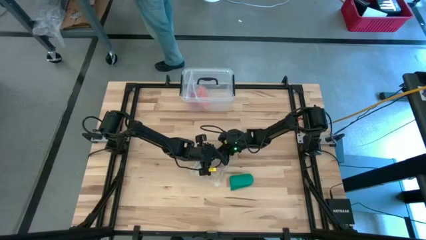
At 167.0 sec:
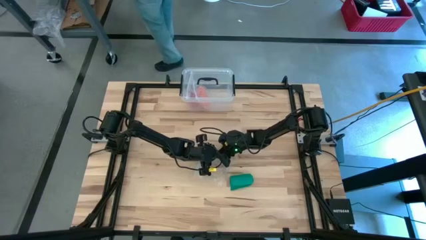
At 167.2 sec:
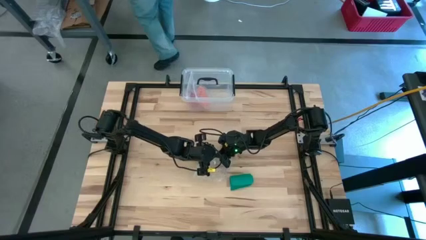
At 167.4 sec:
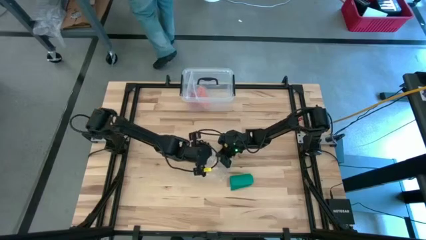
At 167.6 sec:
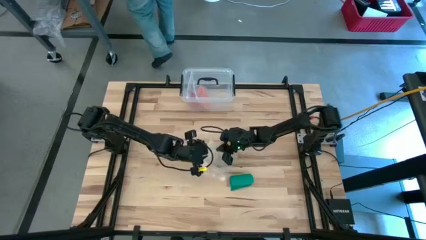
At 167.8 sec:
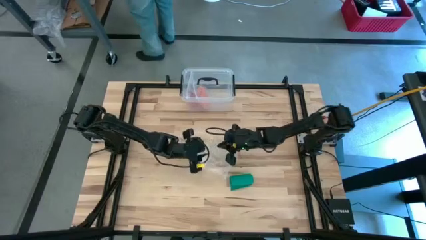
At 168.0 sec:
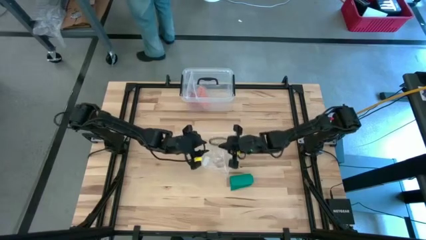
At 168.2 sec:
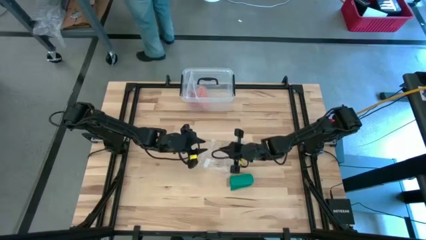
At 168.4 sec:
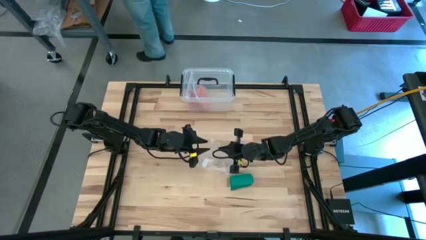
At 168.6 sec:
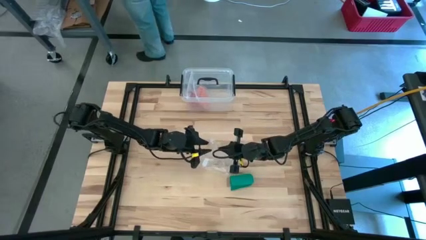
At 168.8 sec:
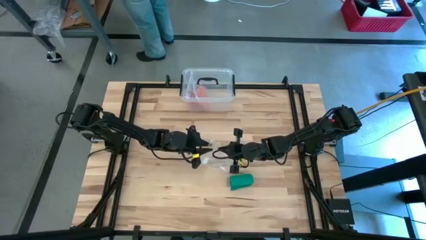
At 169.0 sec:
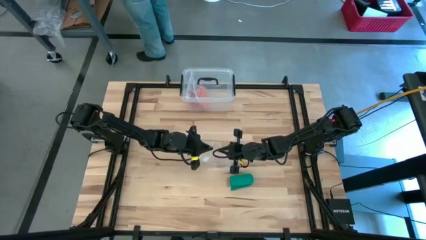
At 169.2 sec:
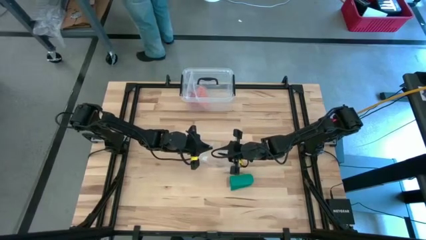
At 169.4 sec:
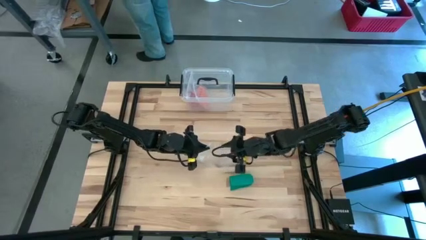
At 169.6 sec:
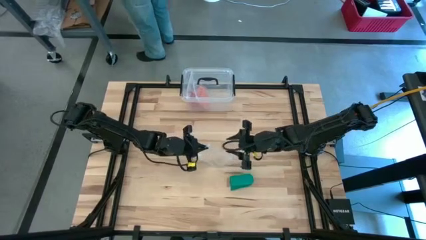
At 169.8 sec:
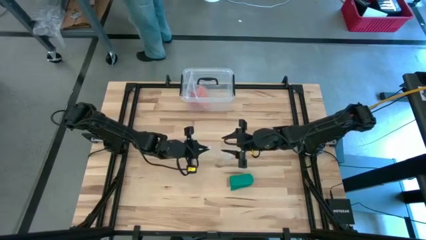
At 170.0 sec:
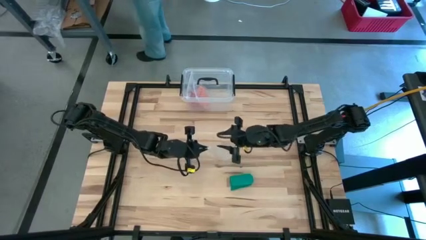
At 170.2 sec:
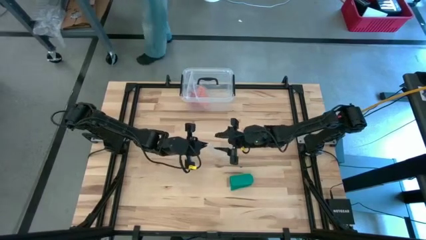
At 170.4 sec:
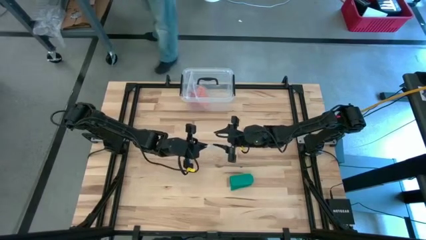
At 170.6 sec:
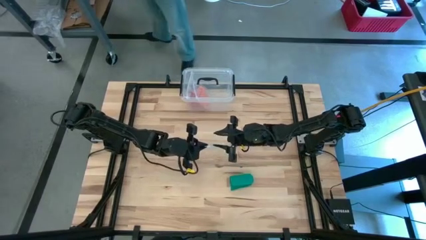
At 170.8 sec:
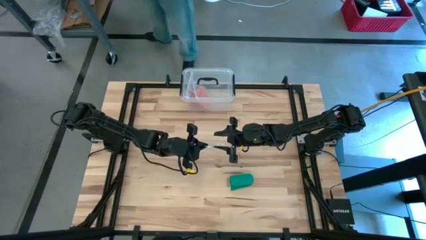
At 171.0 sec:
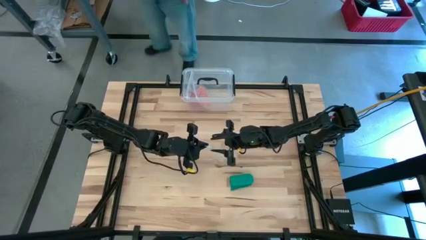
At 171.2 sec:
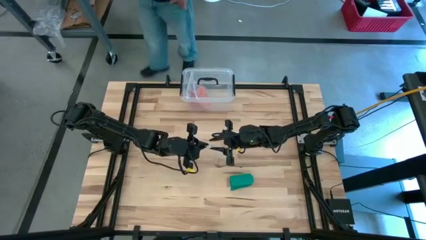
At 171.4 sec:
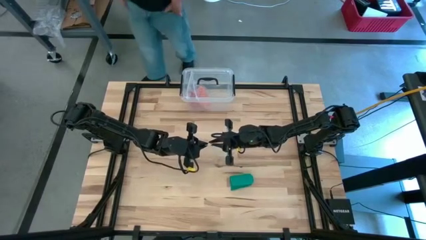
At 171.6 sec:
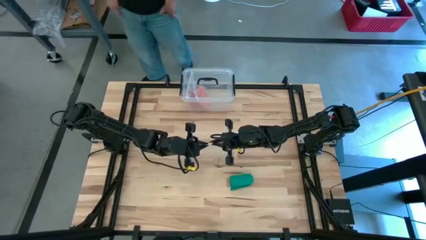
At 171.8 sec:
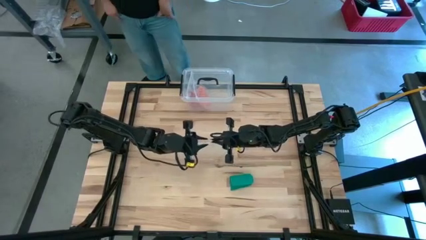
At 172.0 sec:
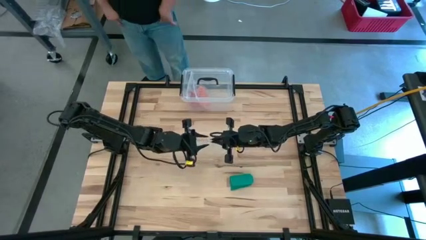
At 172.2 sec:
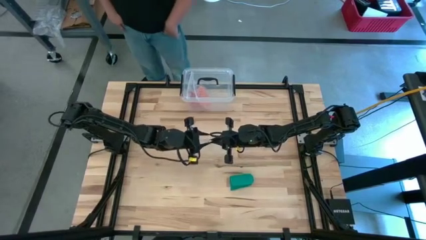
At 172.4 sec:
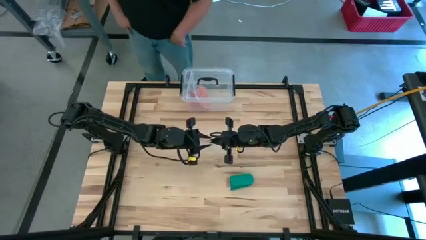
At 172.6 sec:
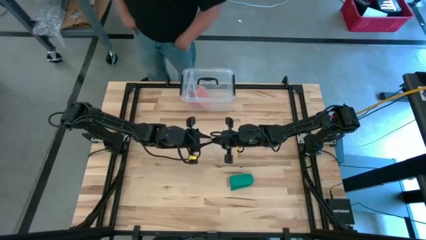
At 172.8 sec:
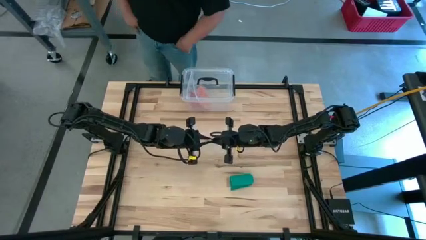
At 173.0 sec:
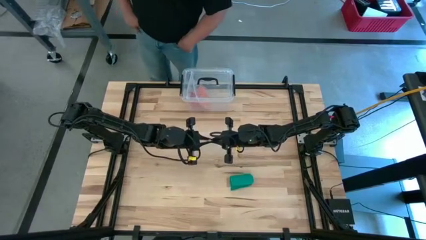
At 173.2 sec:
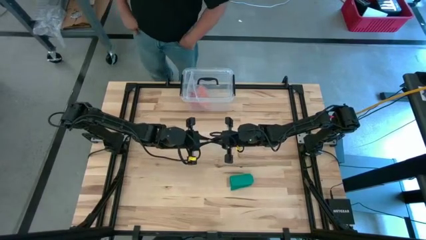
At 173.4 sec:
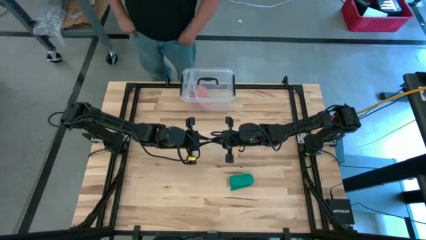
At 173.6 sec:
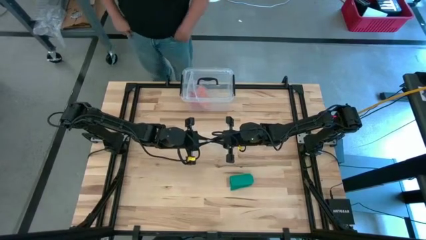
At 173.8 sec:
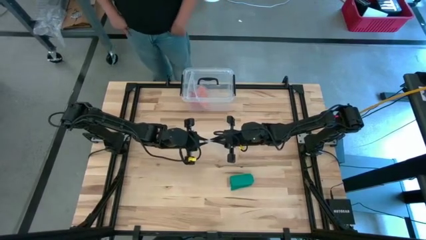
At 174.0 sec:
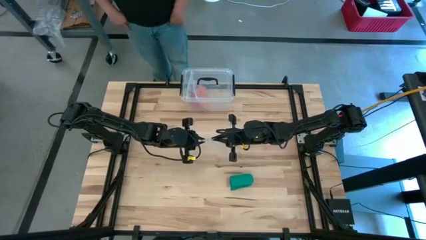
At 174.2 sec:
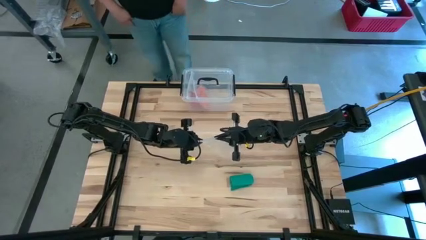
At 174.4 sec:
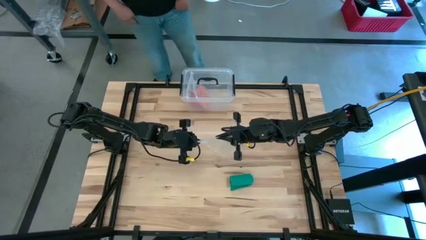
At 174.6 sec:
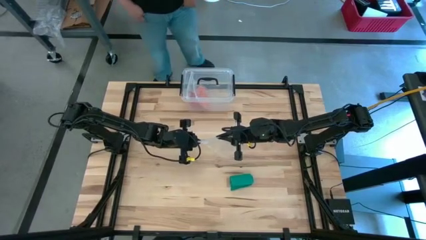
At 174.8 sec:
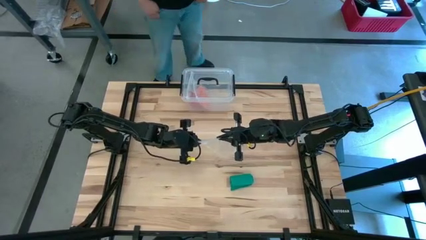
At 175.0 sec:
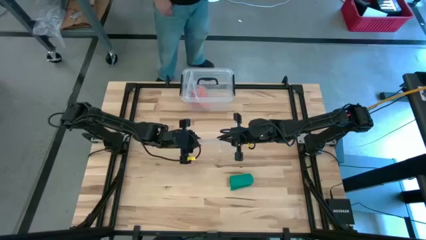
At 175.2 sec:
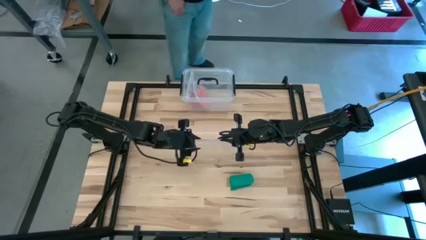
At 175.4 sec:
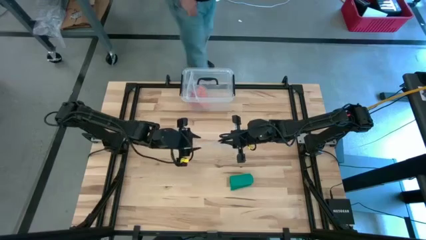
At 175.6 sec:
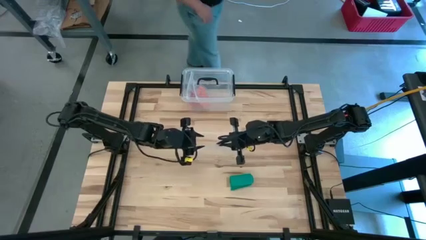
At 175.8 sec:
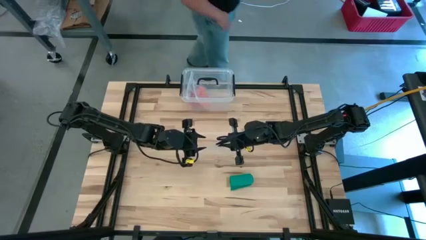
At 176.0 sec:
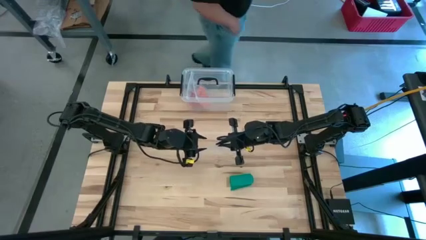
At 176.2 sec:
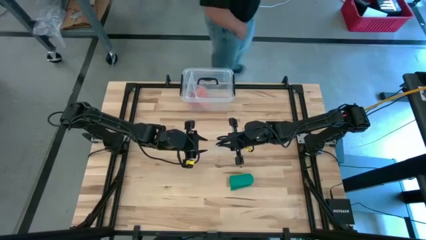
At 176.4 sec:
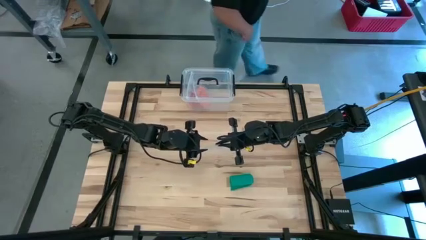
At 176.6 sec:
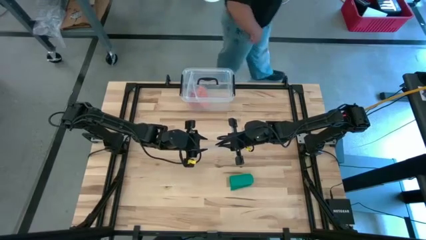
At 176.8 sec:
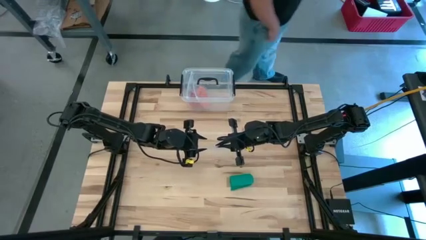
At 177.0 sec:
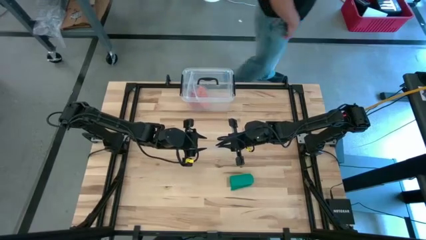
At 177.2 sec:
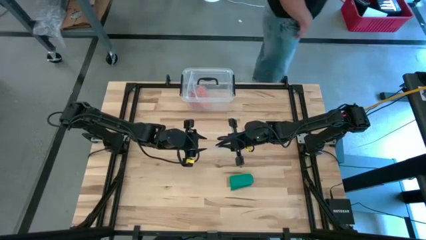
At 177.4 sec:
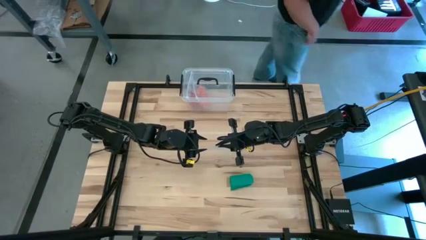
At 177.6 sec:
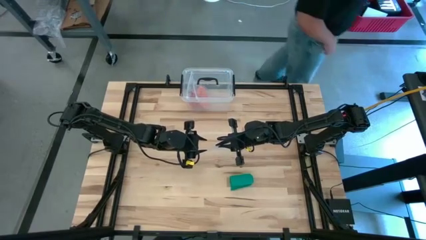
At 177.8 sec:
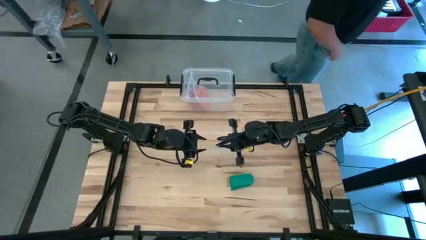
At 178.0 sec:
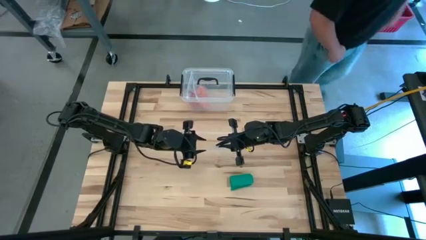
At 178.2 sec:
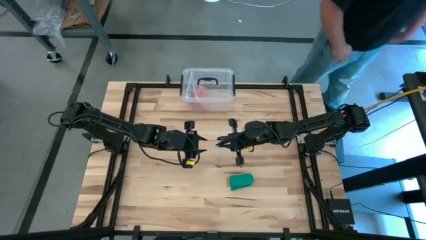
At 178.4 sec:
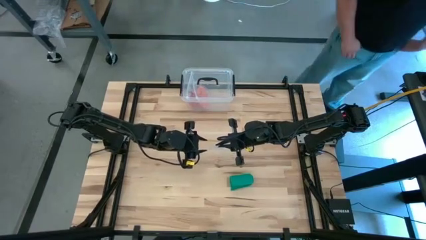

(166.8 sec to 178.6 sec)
Task: Roll bandage
Open the transparent zip bag
